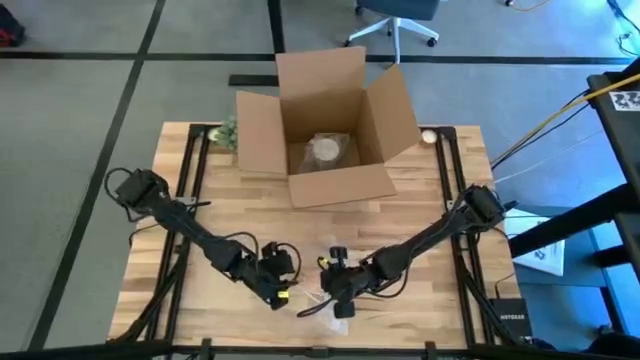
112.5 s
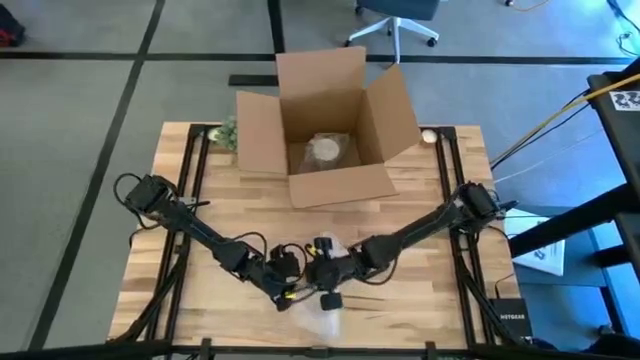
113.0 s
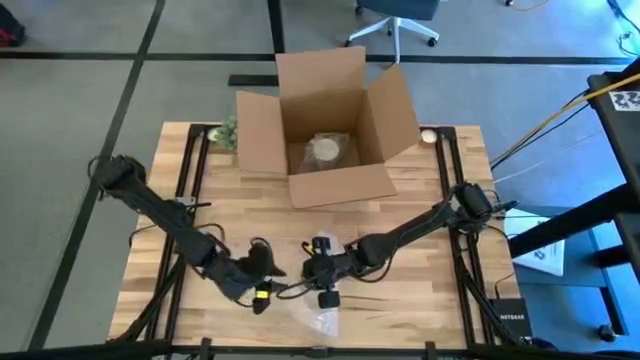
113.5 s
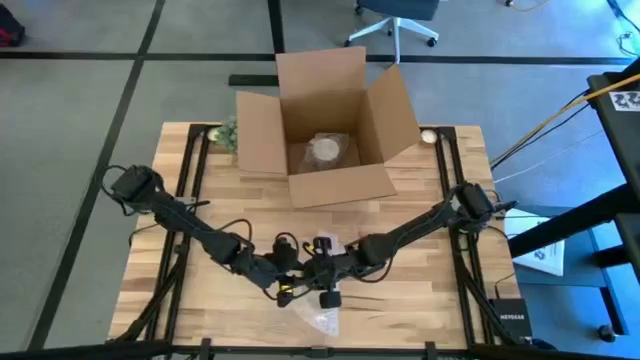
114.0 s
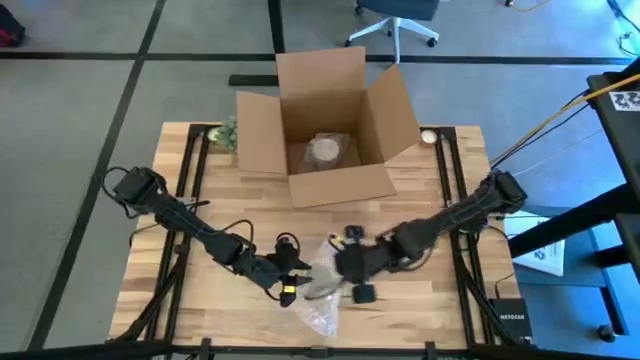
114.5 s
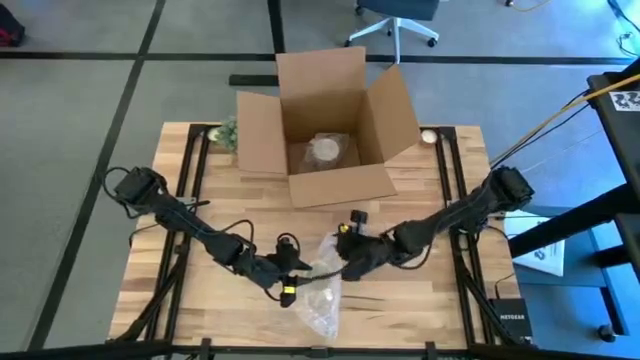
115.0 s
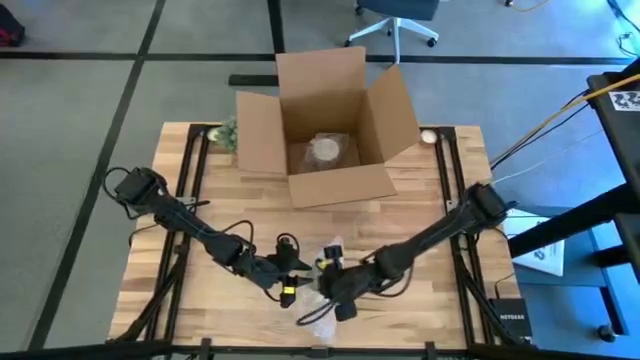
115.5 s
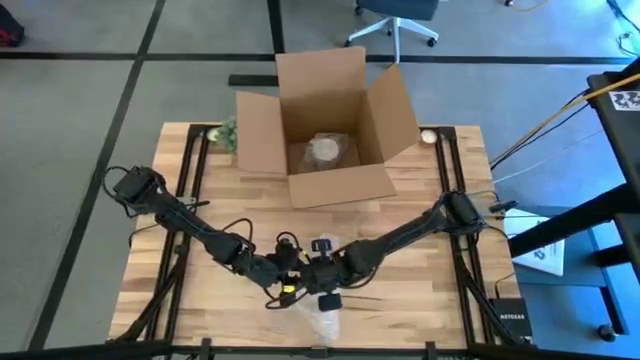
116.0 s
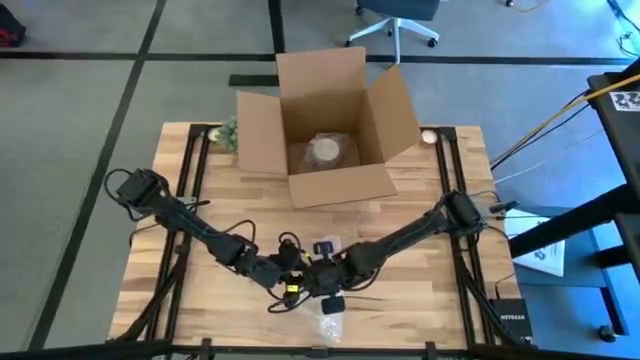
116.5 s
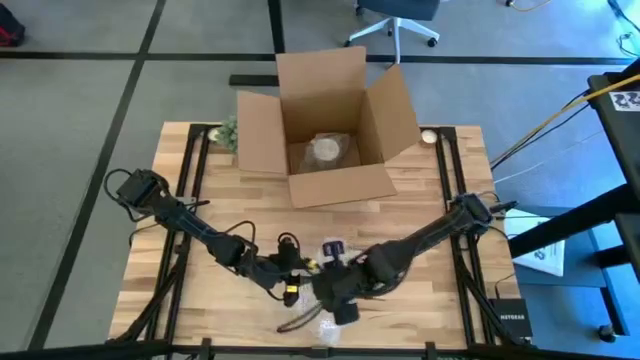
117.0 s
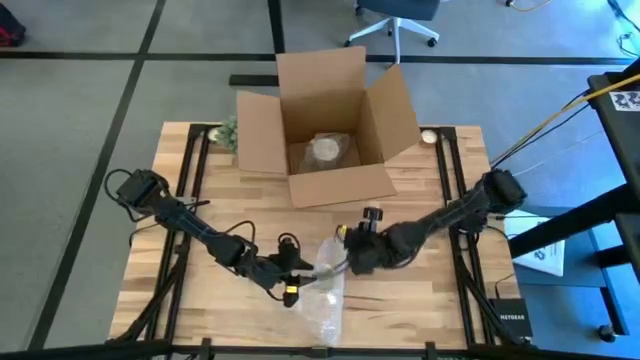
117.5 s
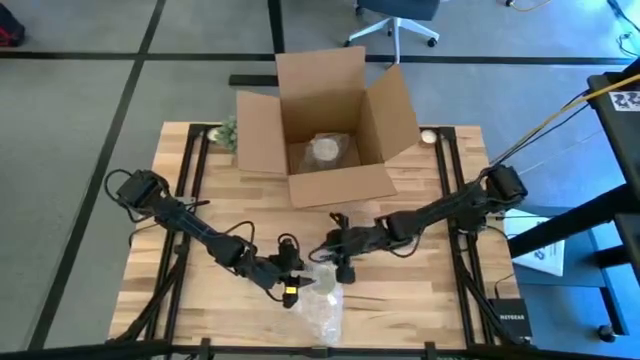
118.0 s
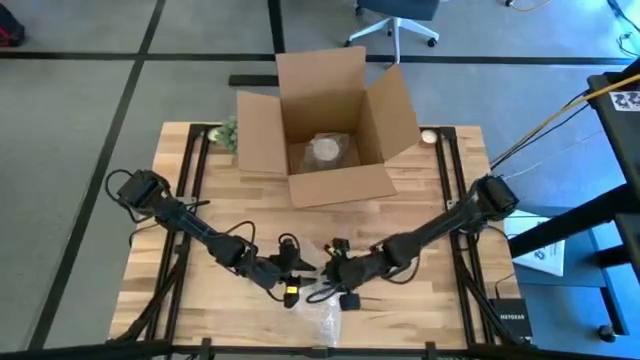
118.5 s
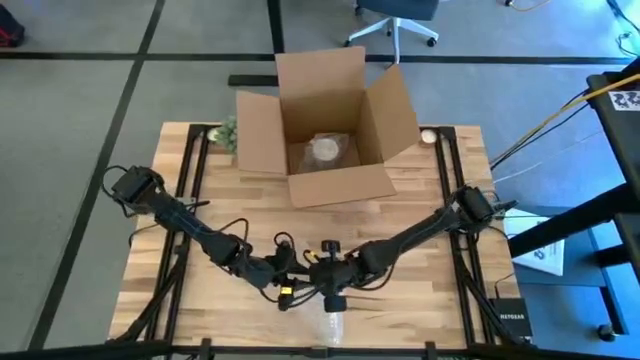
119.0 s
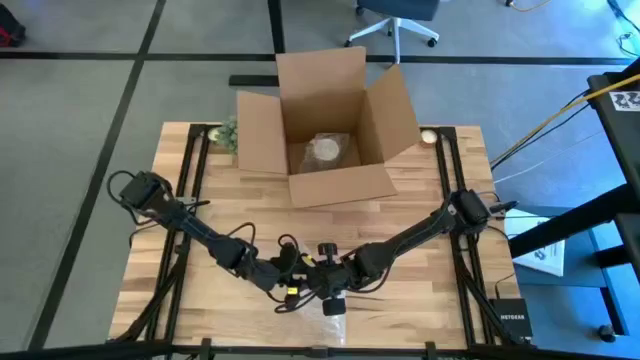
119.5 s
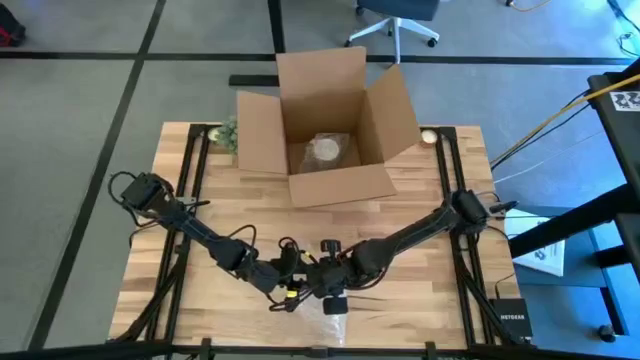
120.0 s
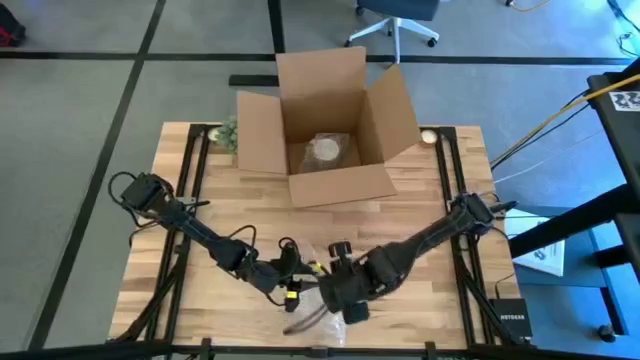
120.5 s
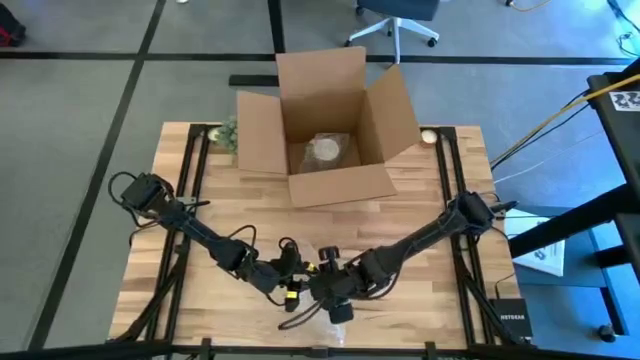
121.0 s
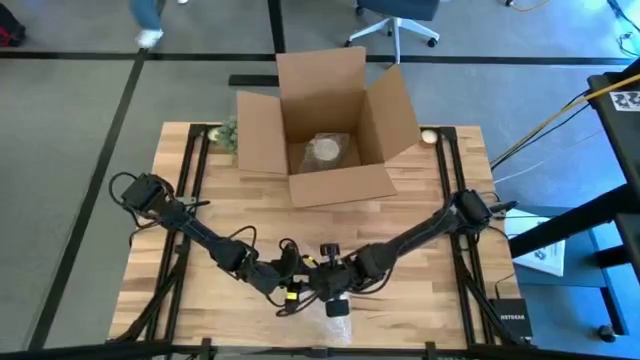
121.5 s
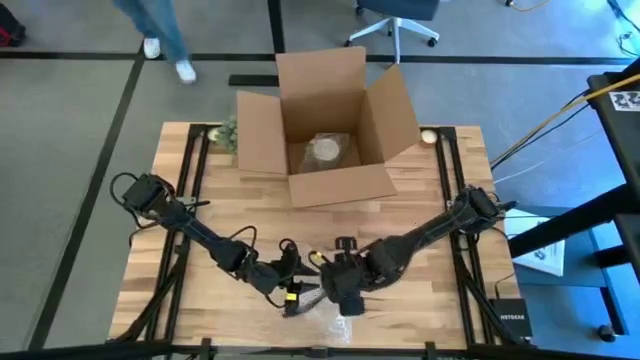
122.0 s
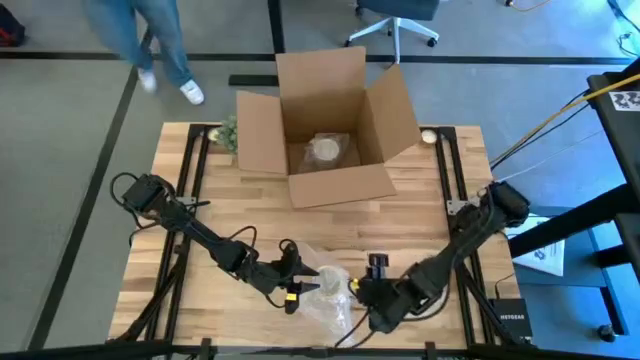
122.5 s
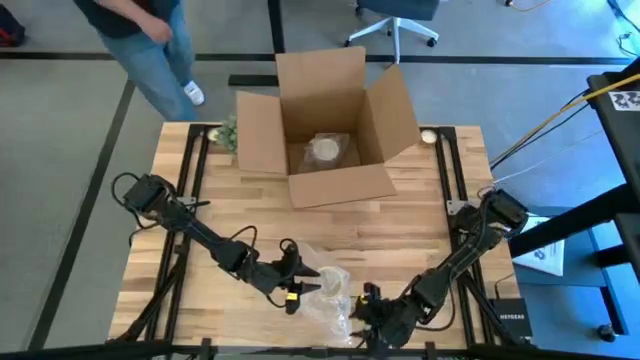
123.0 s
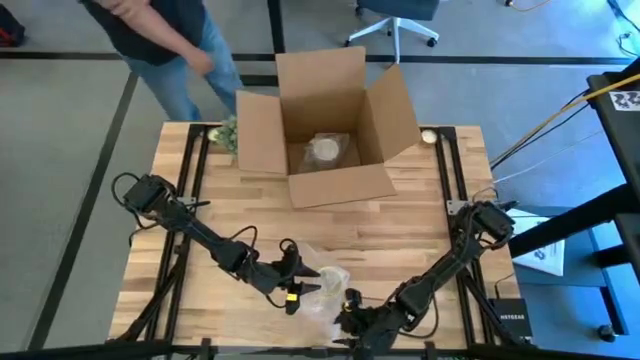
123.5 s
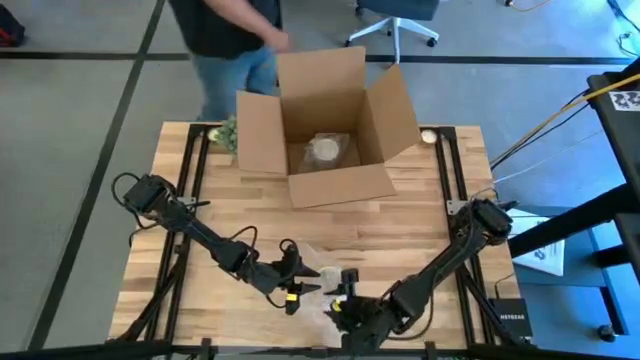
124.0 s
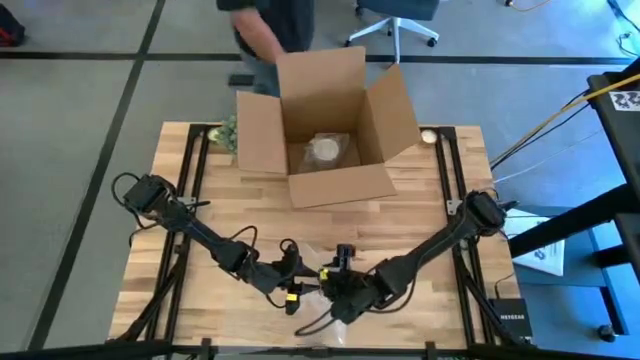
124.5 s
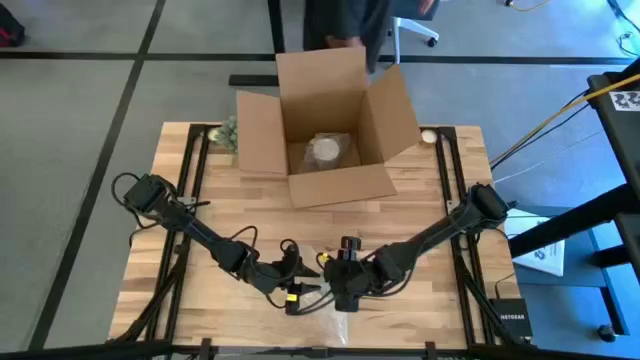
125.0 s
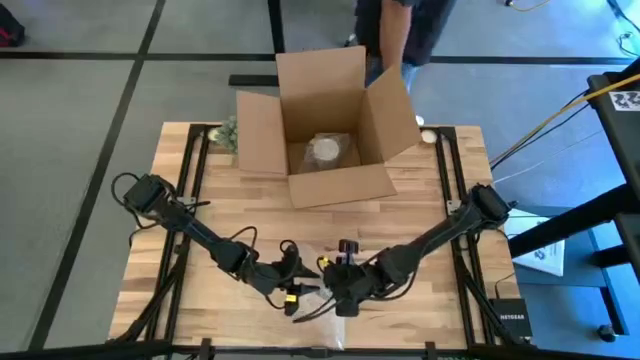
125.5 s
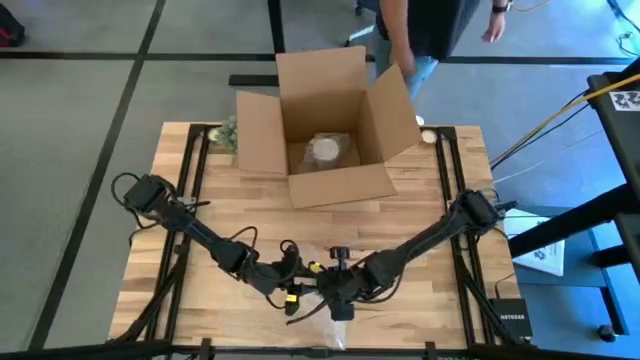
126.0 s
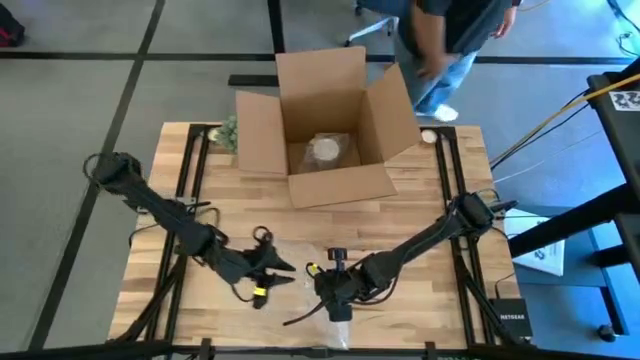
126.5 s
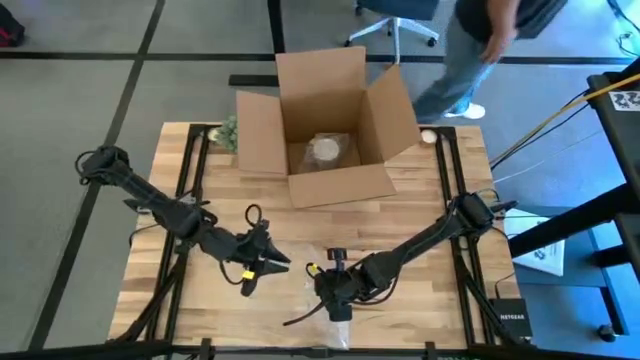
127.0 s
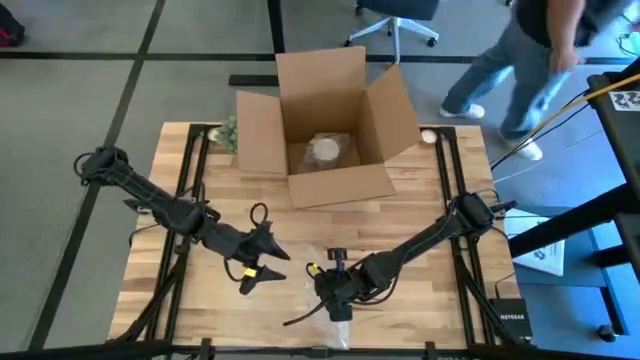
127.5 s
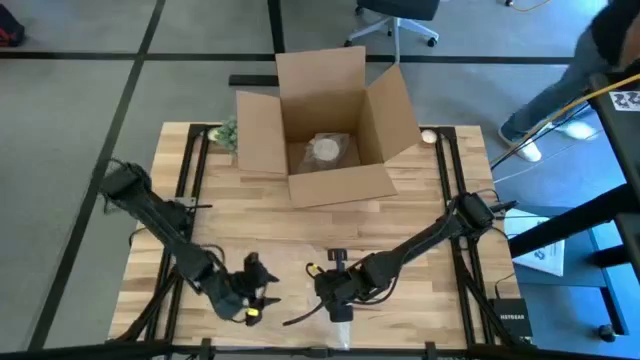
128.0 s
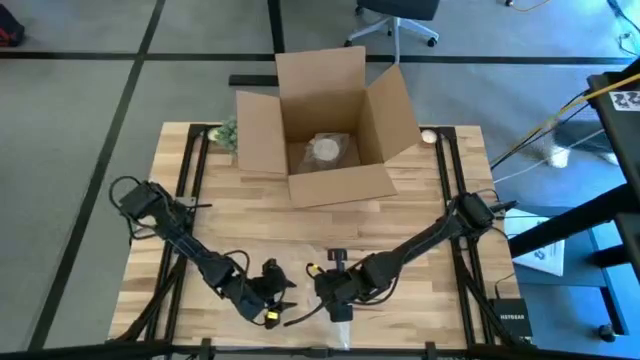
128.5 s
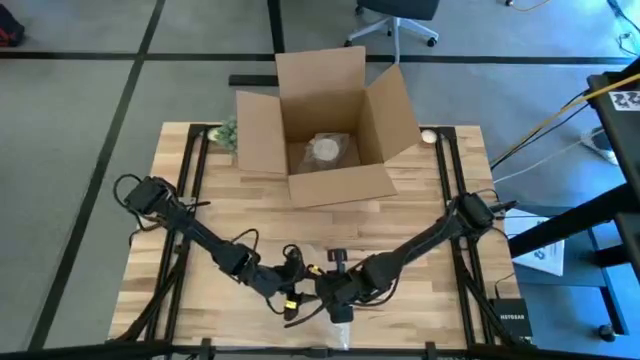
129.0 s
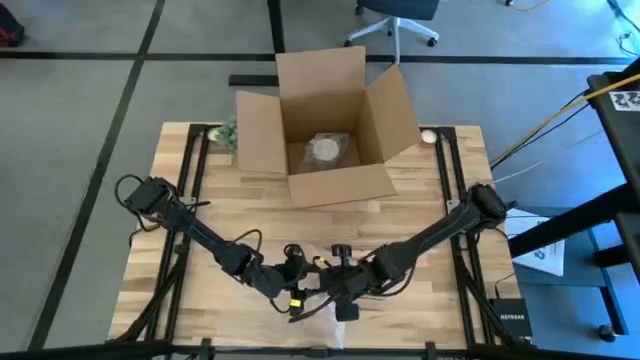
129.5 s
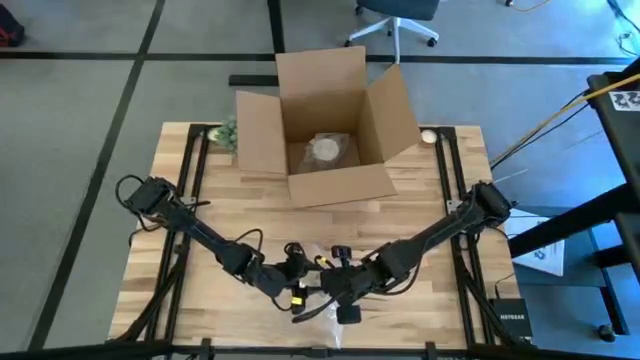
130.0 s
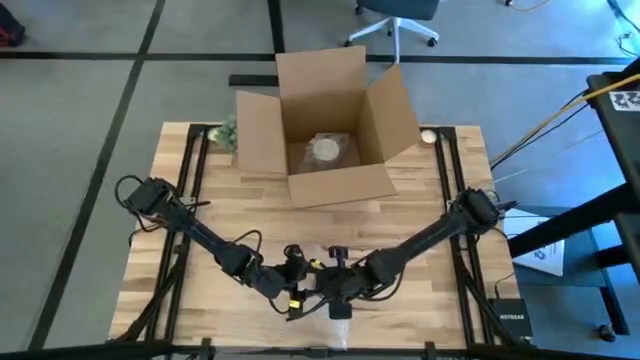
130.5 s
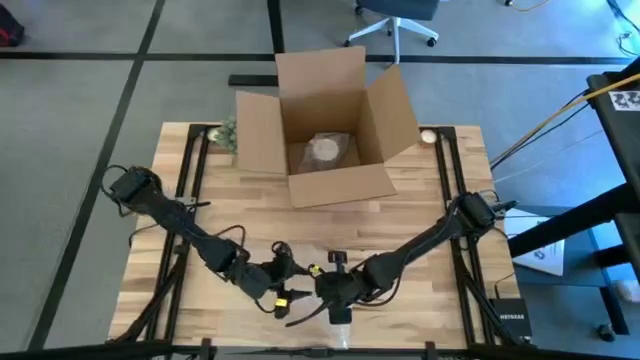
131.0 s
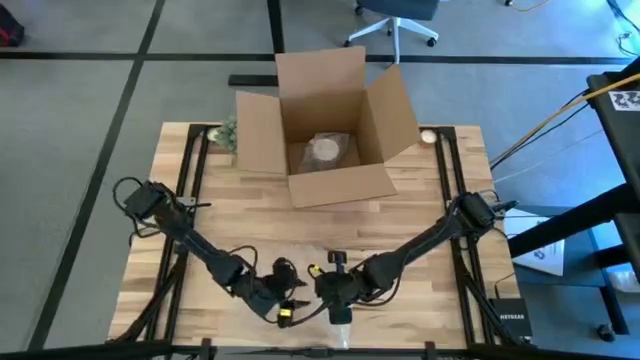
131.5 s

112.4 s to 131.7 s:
Task: wrap mug
Wrap the orange mug with transparent bubble wrap
